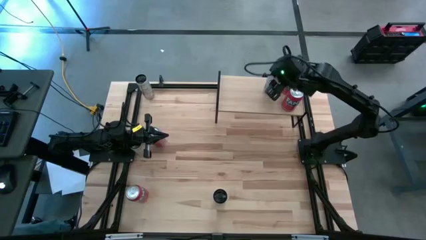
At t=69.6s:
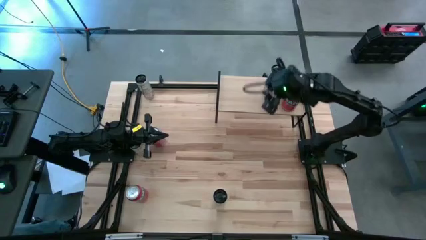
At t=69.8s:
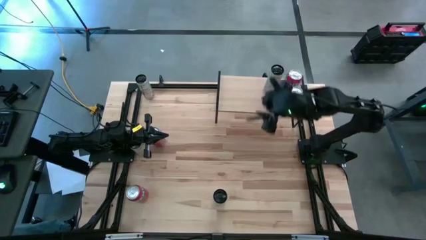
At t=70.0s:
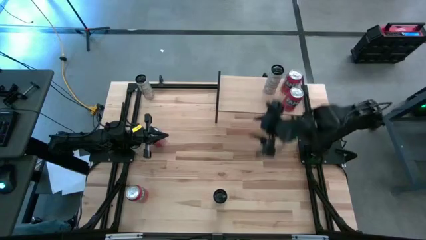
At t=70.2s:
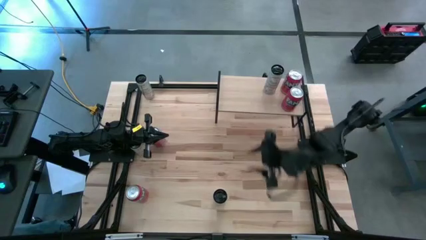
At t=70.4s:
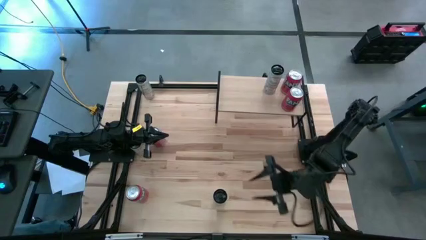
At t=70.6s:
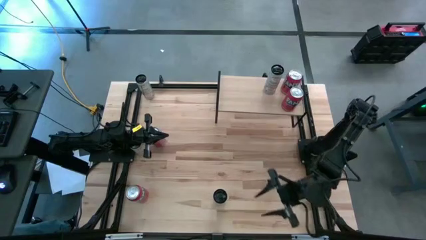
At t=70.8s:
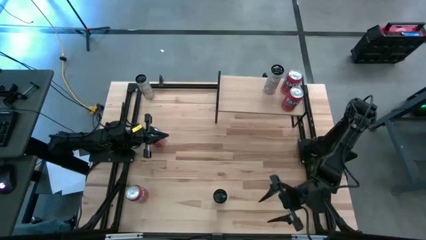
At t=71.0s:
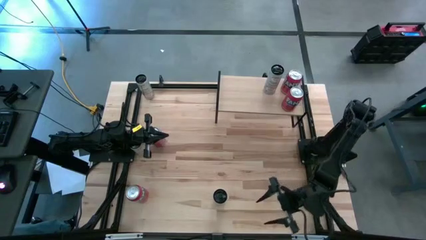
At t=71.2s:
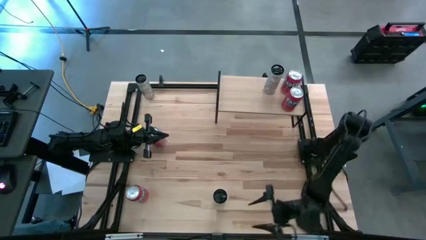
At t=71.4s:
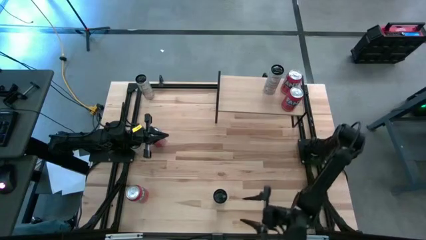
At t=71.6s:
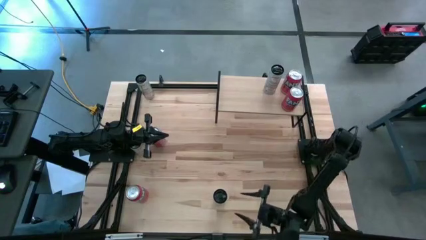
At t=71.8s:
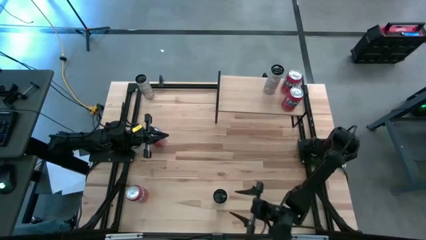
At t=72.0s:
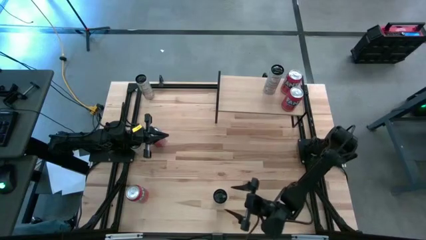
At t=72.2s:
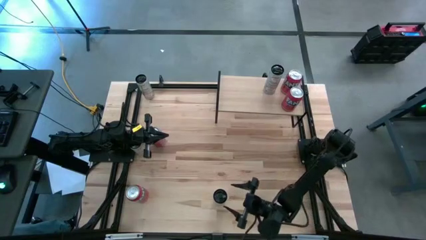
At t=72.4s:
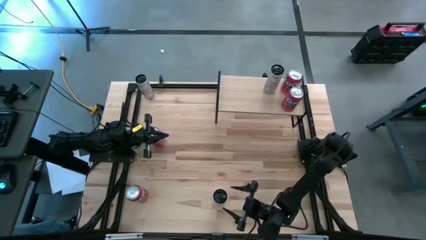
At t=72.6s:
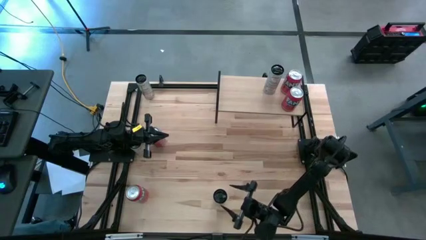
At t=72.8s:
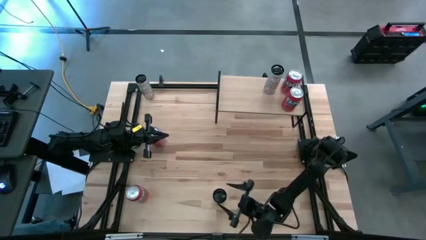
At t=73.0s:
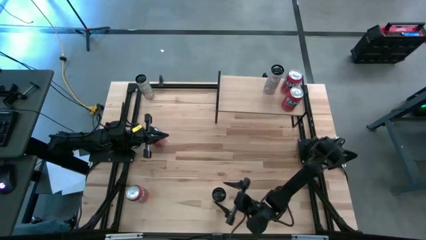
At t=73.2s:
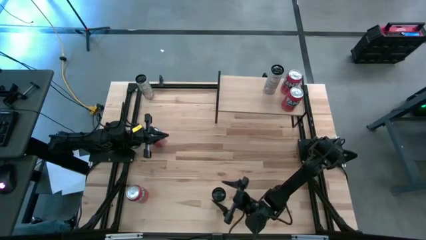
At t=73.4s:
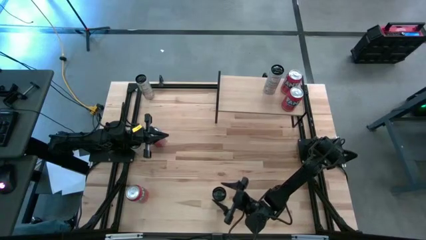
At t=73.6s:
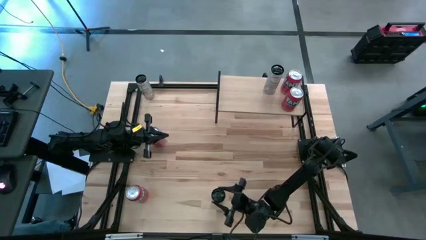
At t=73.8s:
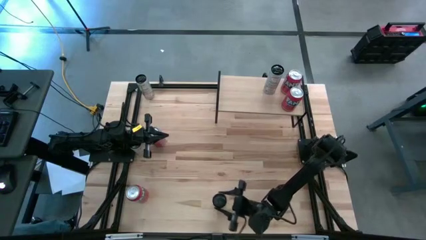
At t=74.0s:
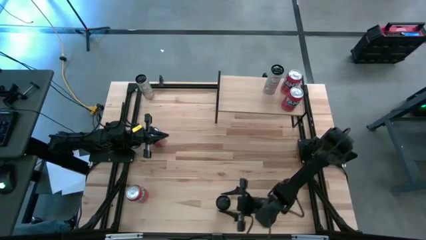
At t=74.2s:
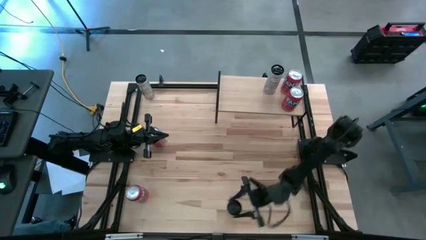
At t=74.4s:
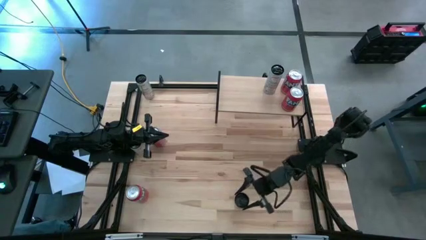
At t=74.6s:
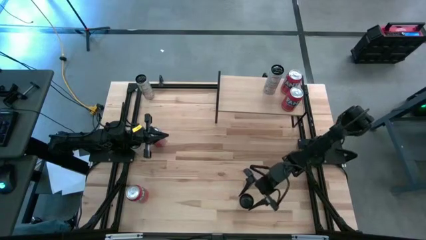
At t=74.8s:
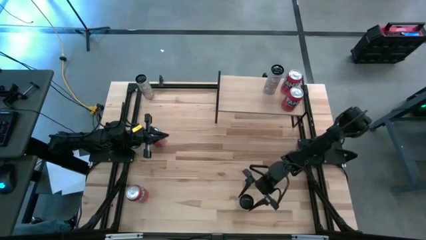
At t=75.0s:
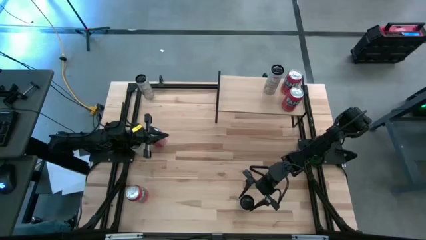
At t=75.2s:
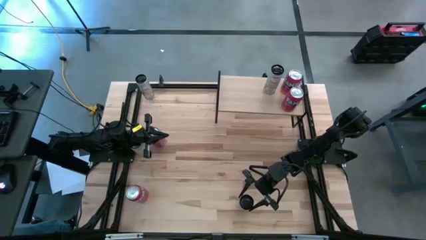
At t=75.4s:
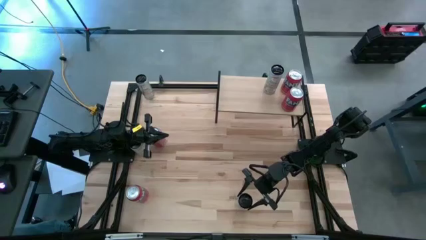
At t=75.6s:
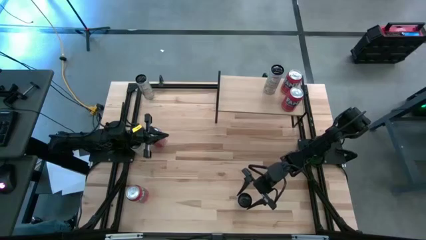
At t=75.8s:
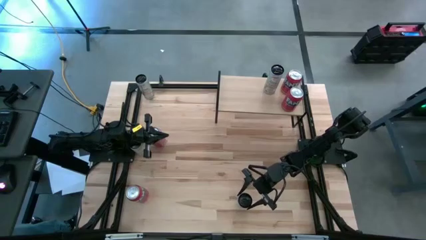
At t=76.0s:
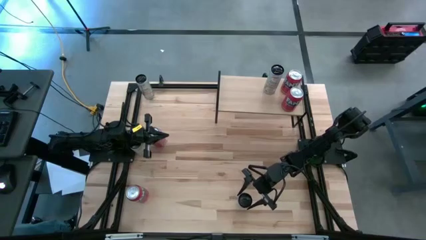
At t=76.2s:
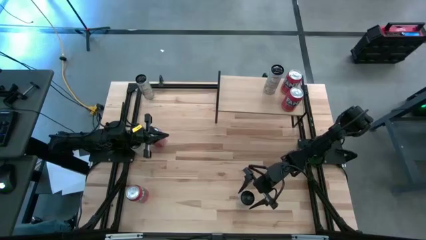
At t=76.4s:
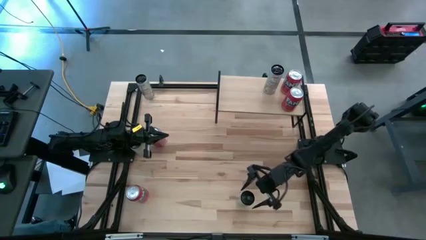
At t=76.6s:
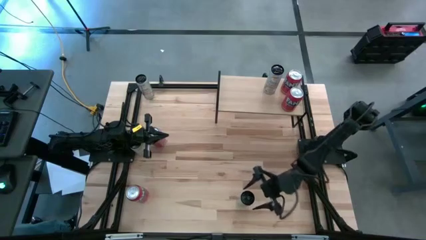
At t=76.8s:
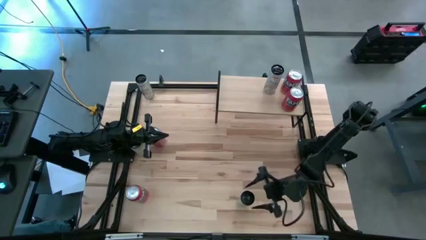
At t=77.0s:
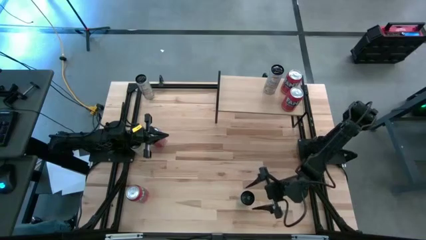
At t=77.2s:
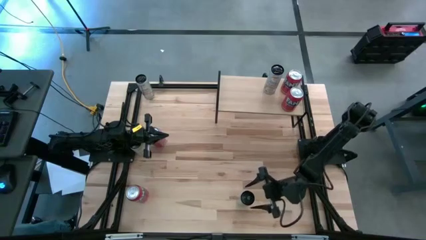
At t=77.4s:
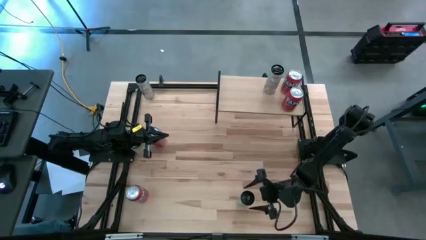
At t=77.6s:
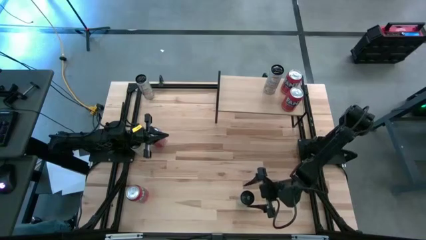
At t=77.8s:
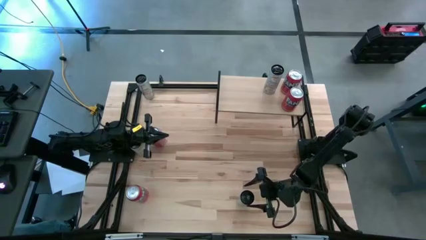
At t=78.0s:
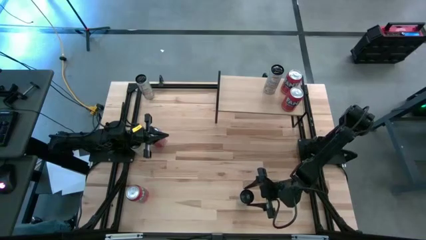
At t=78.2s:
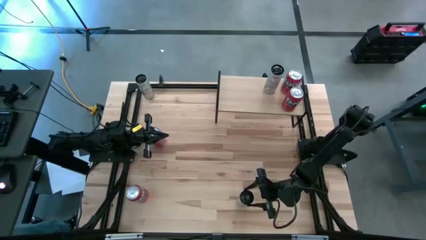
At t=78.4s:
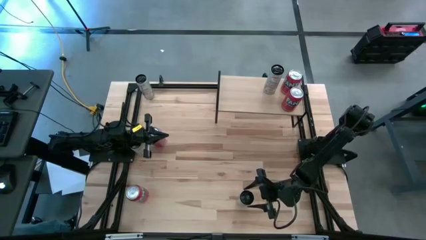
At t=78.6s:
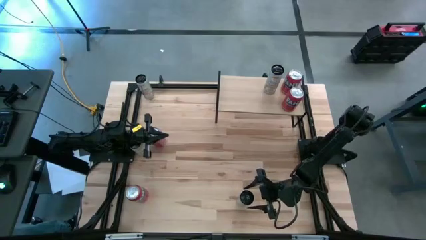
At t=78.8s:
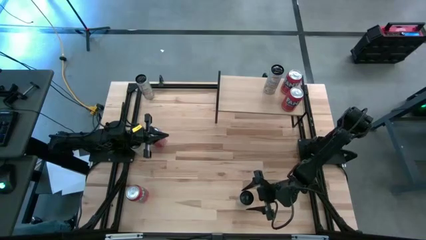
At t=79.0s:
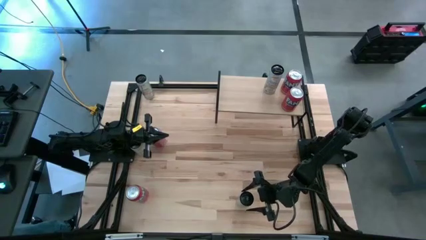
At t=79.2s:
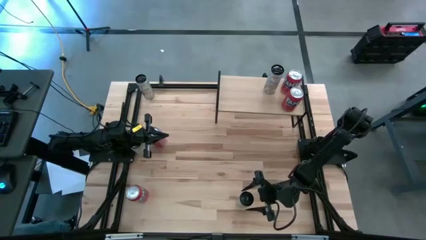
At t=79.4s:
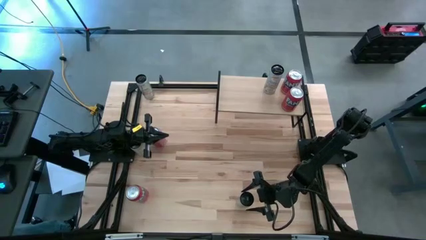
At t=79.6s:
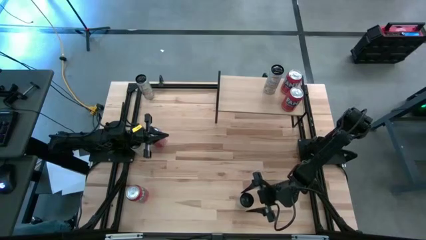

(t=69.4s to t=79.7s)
Task: Place canned beverage on shelf
Put the white soda can on the shelf aligned with the other white soda can
